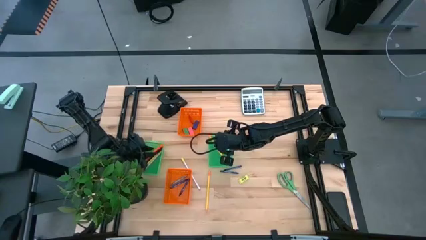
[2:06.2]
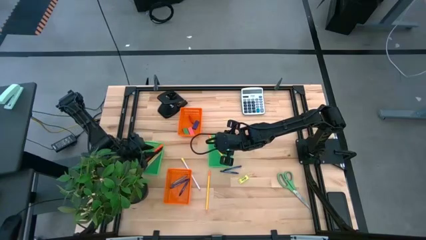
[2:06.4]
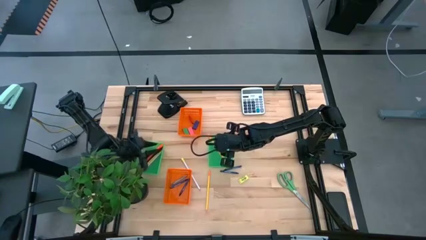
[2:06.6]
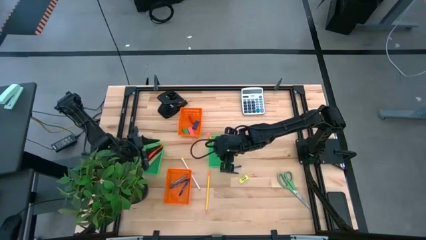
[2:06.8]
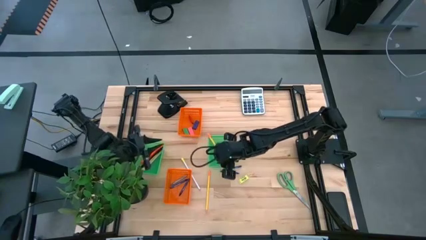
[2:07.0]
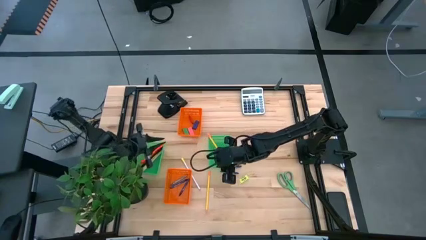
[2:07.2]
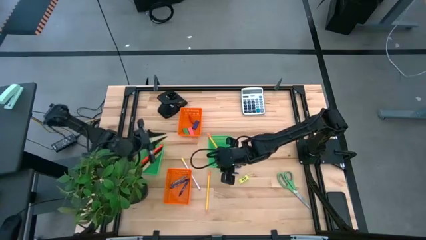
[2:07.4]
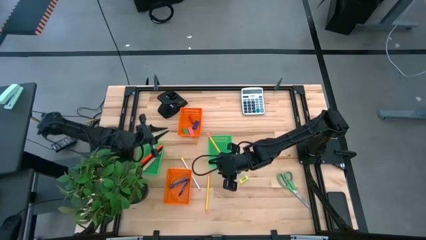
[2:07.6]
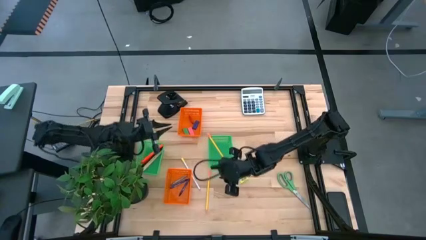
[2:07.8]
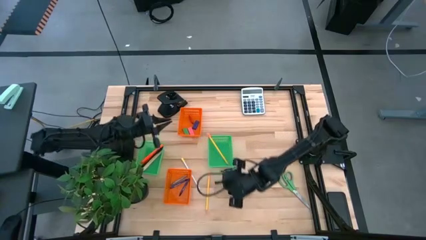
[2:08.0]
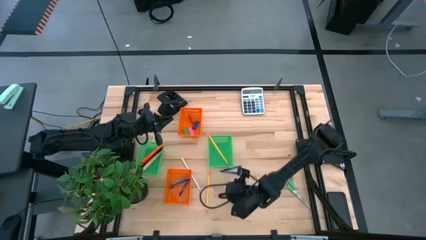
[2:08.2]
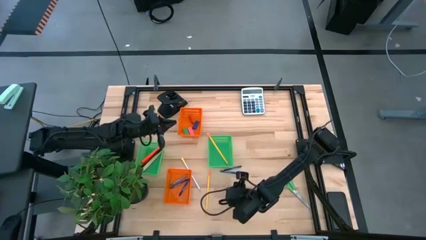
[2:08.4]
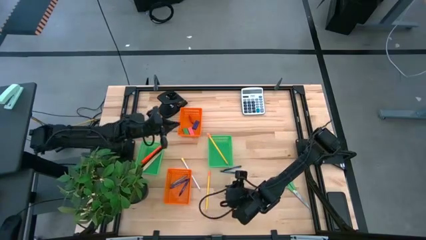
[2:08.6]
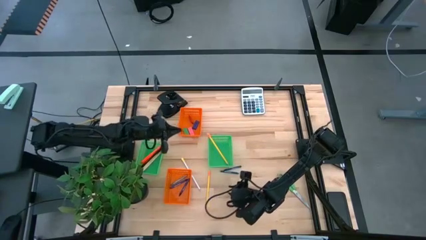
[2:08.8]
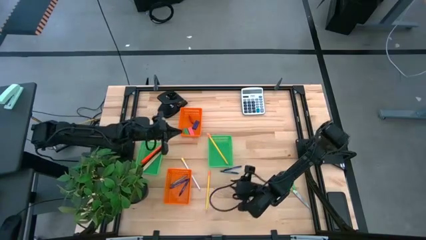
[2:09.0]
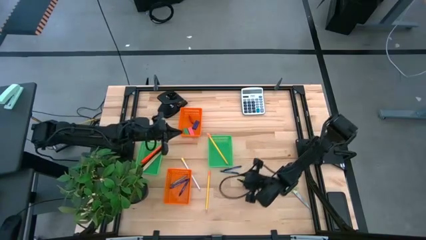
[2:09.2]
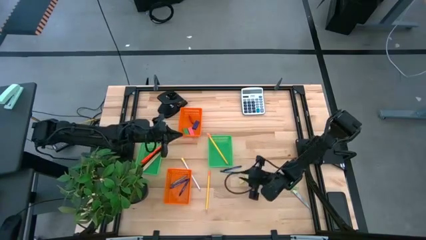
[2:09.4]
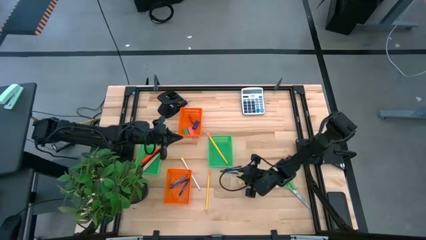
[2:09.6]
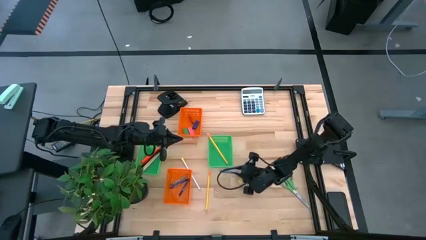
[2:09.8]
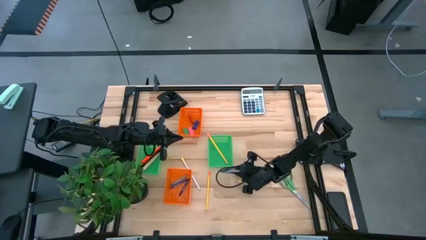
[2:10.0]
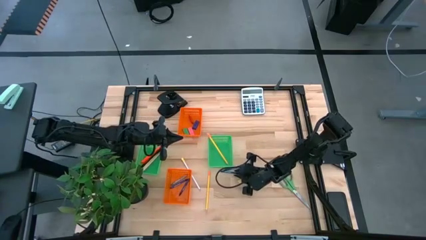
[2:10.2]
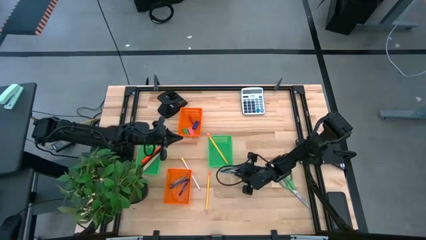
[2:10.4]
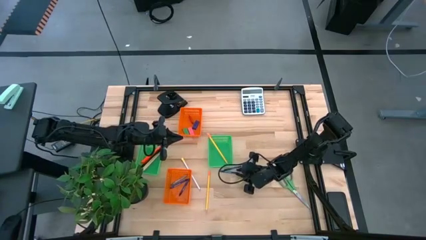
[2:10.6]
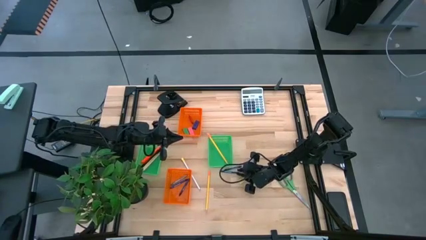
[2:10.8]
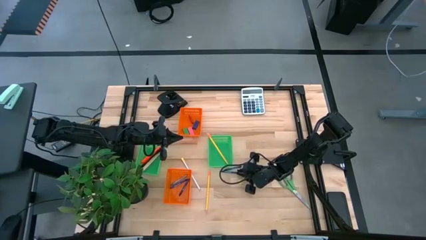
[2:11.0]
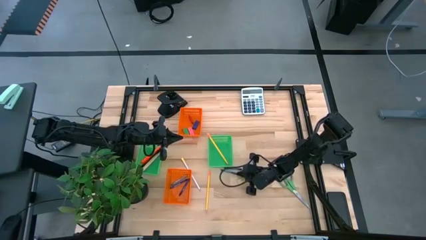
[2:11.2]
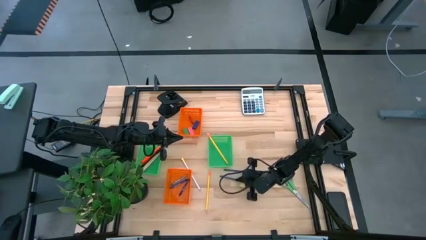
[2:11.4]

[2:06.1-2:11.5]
Task: Sort crayons/erasers/pens/pencils in bins
Put the blue crayon into the bottom orange basket

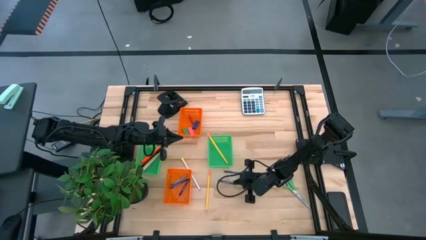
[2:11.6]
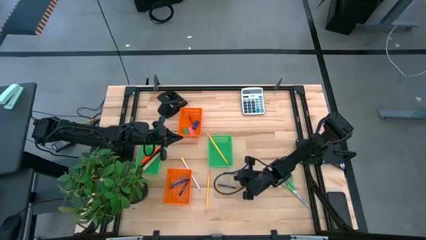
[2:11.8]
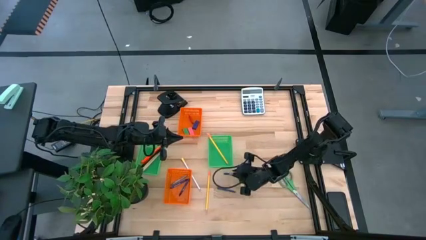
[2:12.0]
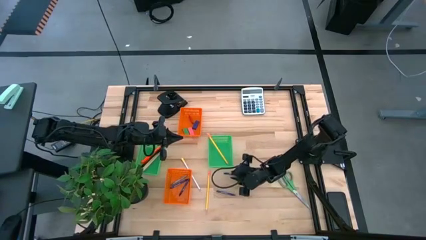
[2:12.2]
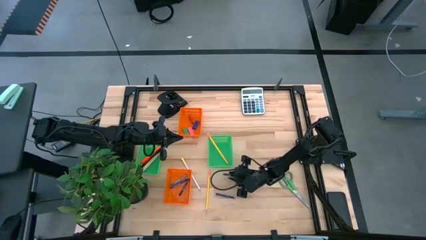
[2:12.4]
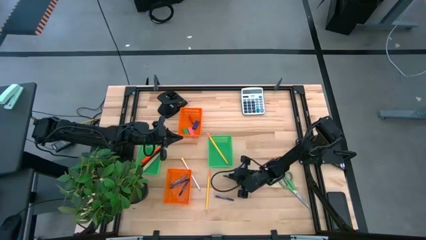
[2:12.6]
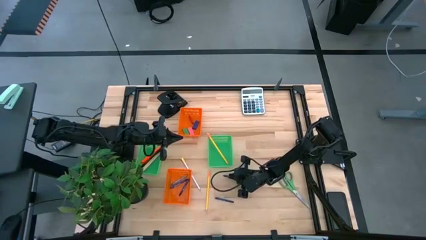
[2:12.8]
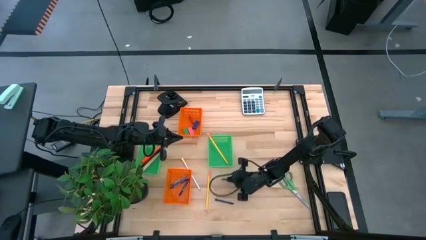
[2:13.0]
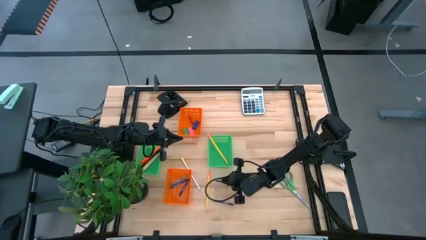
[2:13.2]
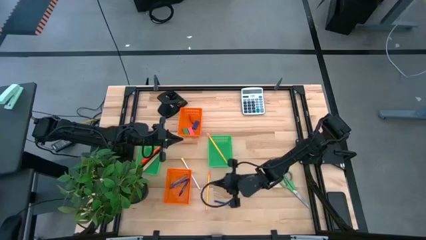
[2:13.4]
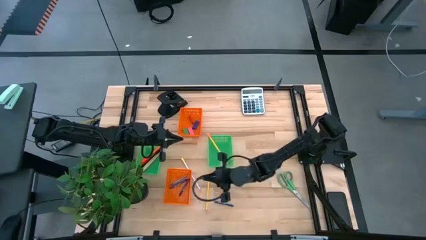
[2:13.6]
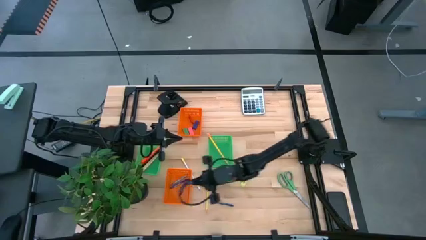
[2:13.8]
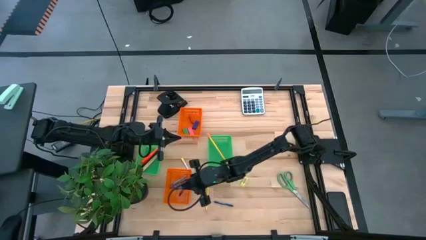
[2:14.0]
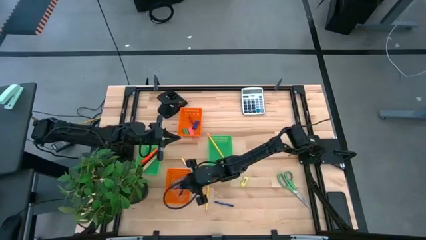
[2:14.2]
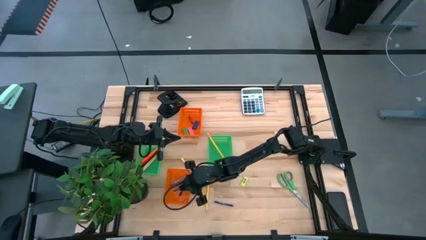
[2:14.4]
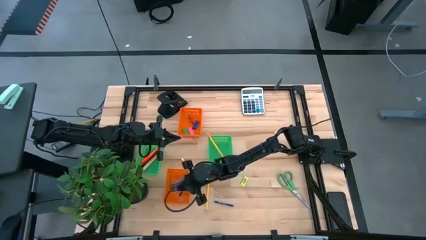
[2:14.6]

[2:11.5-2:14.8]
Put the blue crayon into the bottom orange basket

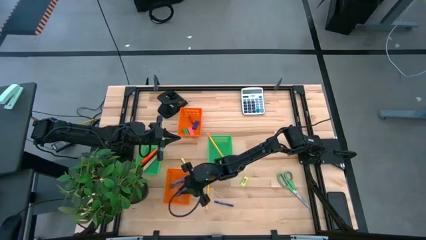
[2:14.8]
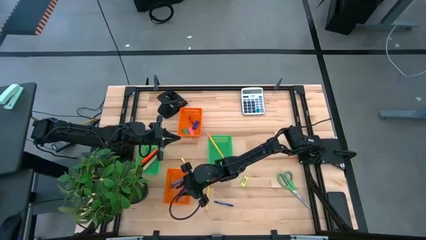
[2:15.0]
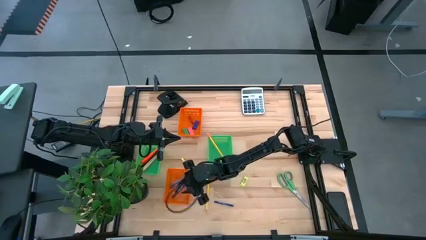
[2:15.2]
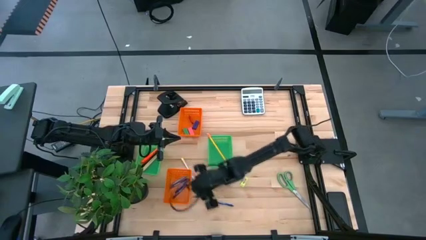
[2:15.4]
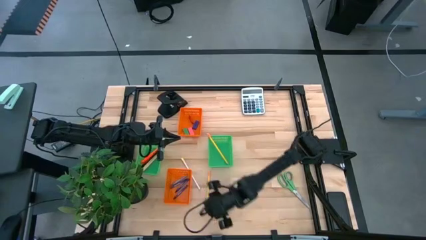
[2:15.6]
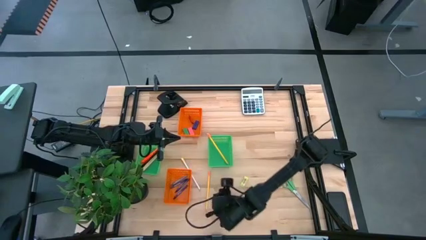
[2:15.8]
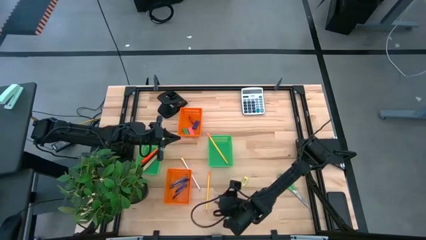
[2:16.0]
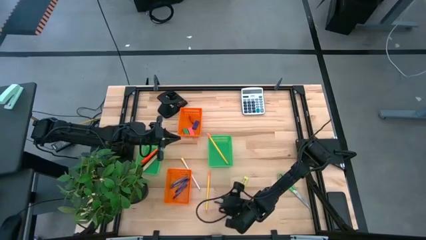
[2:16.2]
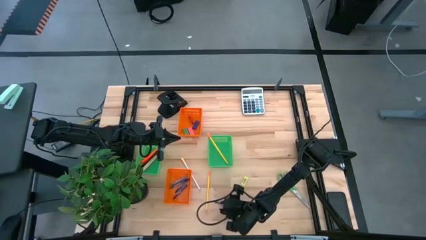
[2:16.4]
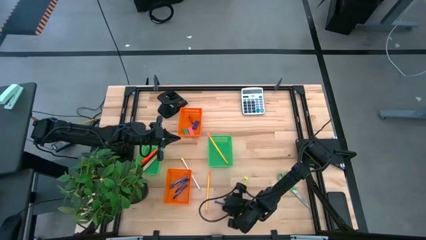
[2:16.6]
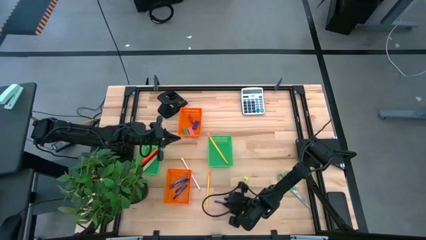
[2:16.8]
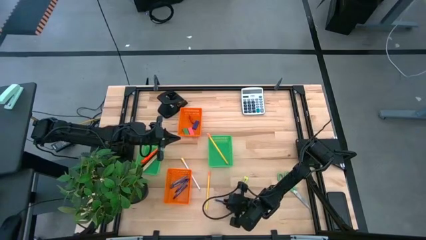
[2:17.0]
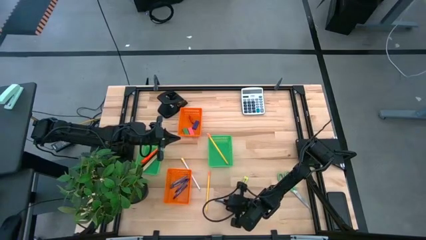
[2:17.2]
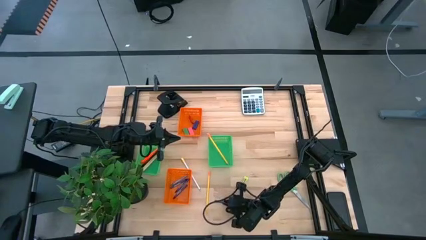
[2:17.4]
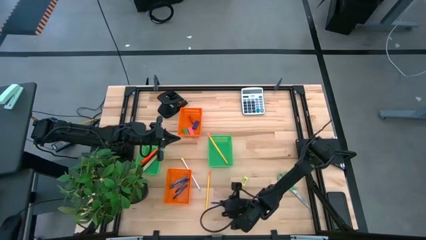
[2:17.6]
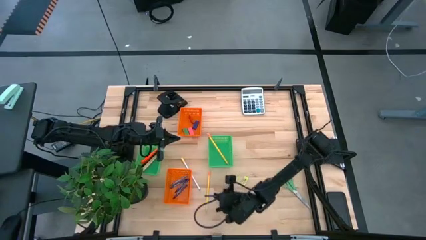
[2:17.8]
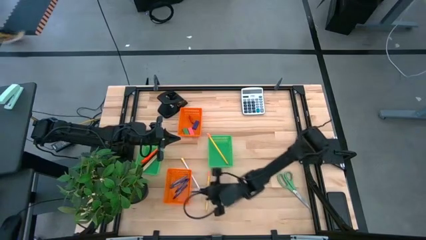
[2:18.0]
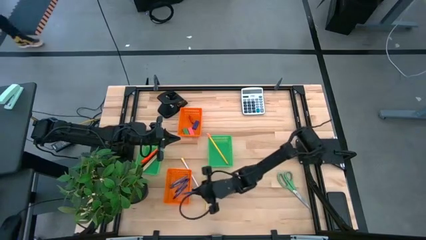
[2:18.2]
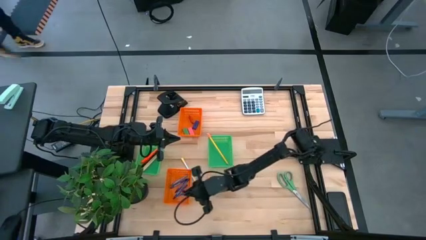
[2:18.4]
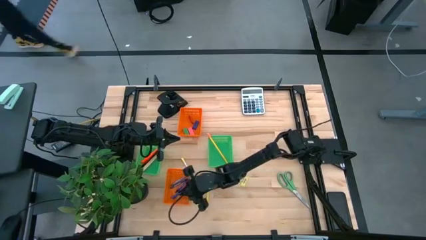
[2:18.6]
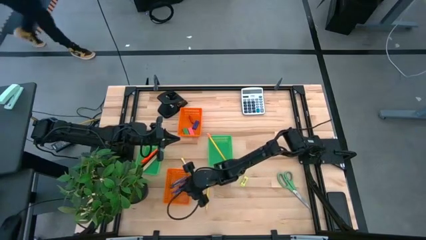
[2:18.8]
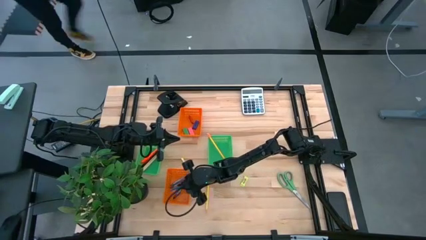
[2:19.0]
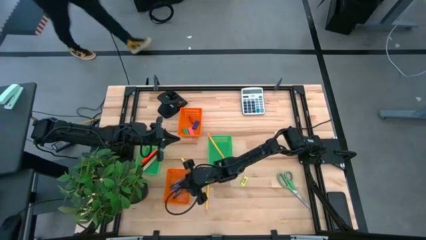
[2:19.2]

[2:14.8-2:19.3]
Put the blue crayon into the bottom orange basket

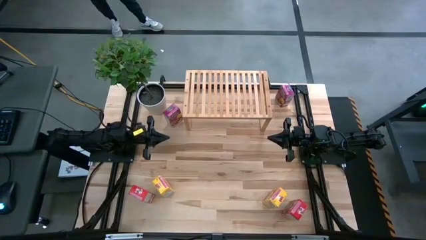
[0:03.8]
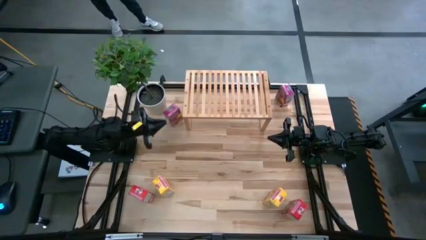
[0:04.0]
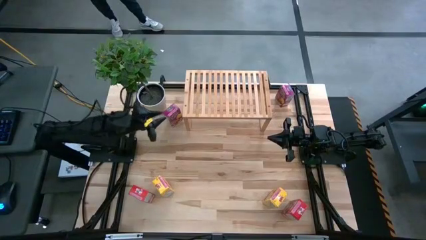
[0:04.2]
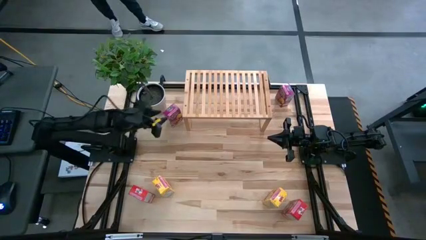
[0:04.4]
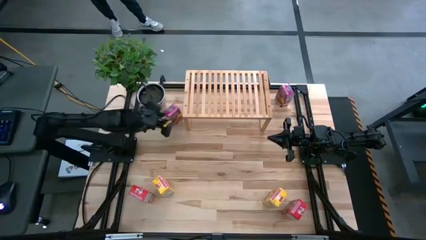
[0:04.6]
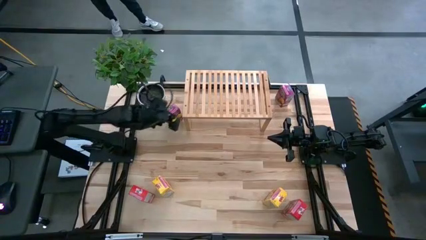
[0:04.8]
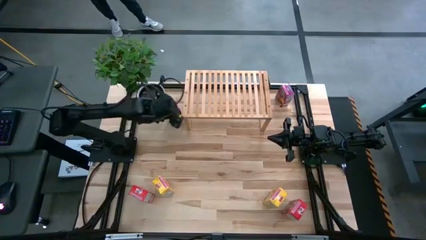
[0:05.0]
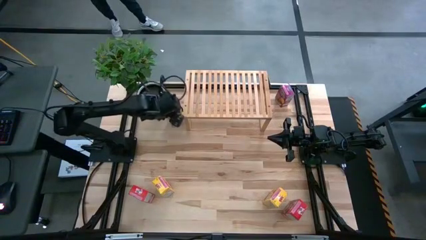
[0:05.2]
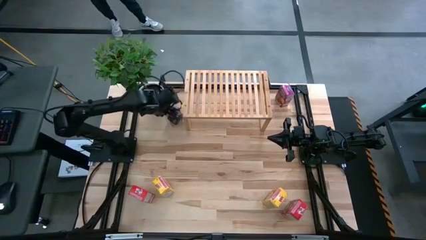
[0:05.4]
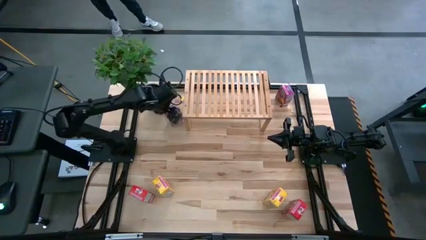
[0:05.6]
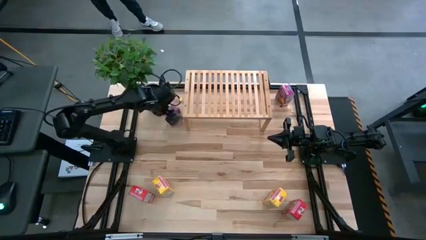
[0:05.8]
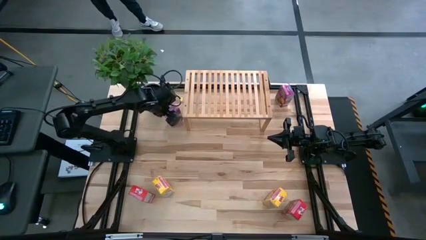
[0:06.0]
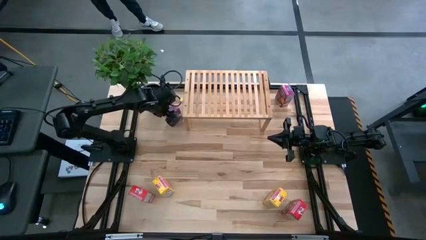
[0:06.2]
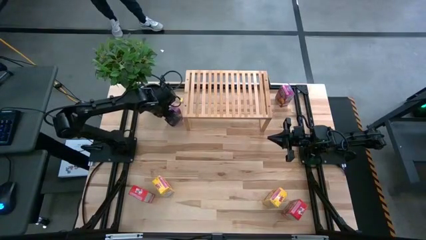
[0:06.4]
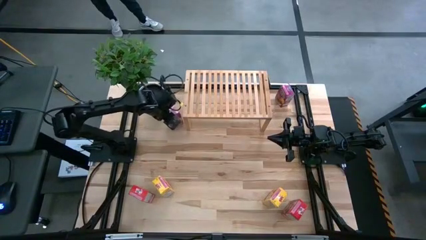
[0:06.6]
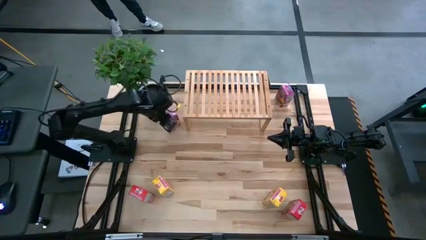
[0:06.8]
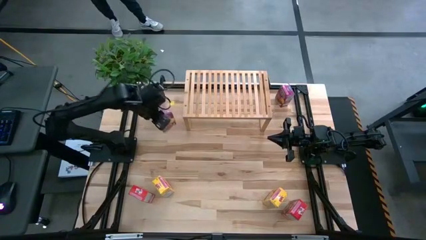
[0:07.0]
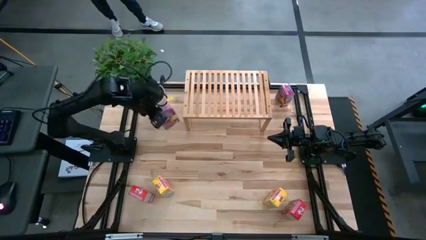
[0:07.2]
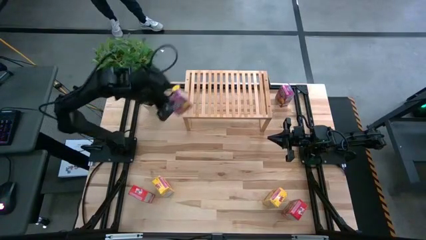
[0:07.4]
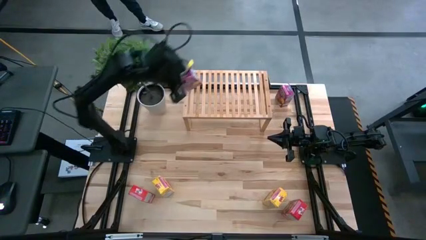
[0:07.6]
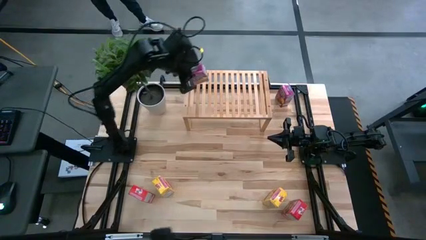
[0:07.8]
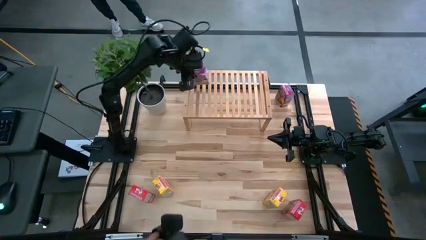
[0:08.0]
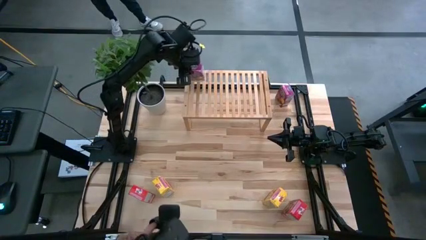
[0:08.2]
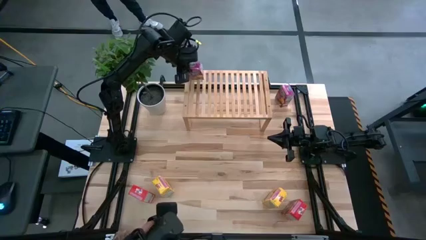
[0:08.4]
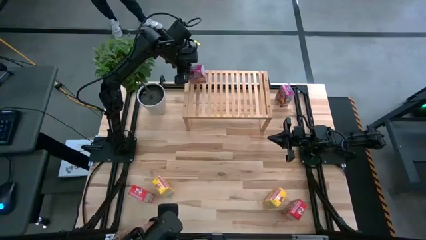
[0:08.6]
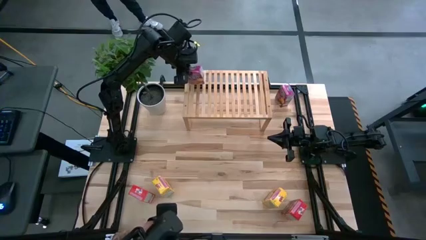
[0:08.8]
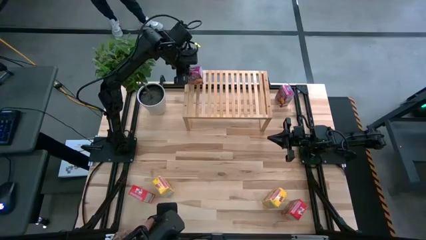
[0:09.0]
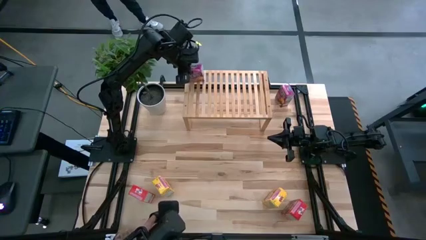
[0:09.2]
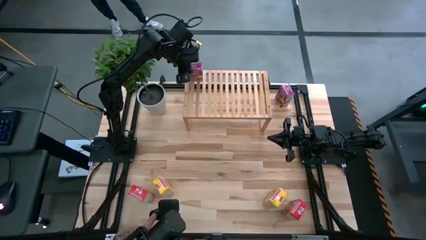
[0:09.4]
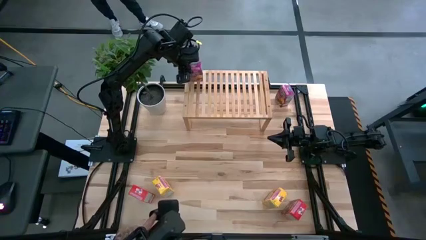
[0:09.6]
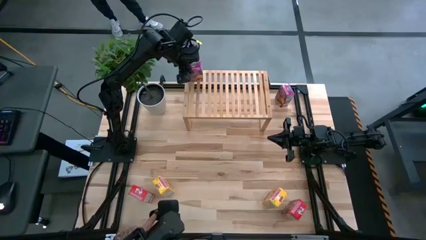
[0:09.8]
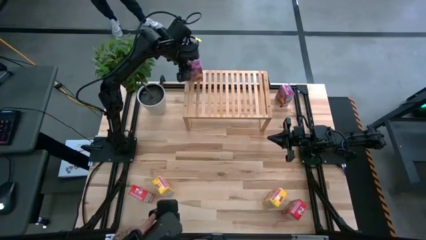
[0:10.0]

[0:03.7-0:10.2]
Task: Stack cereal on shelf
Put the left violet cereal box on the shelf
